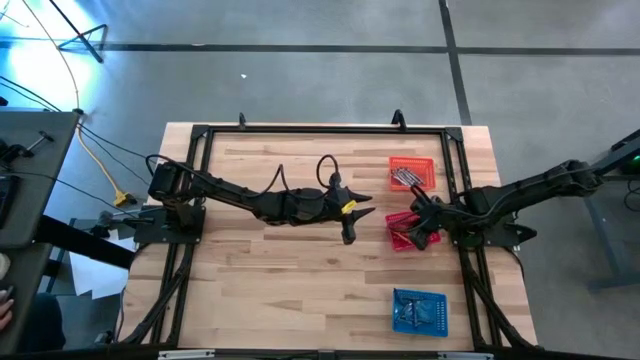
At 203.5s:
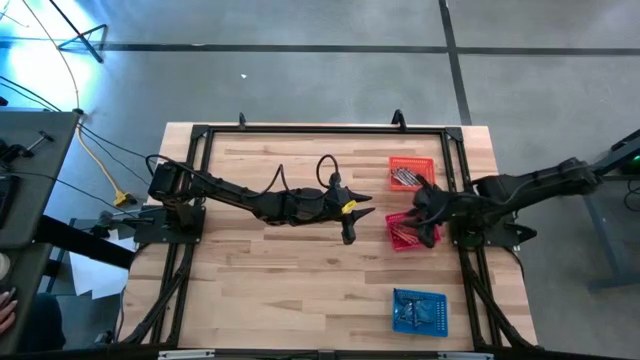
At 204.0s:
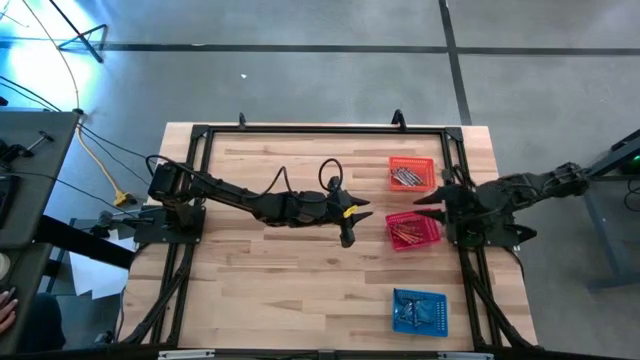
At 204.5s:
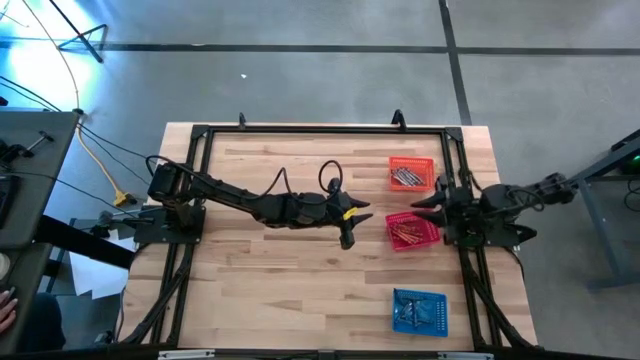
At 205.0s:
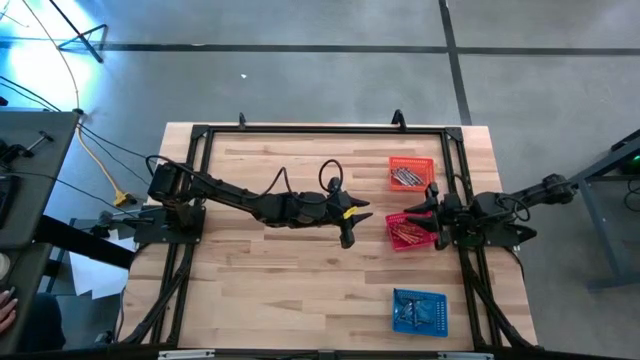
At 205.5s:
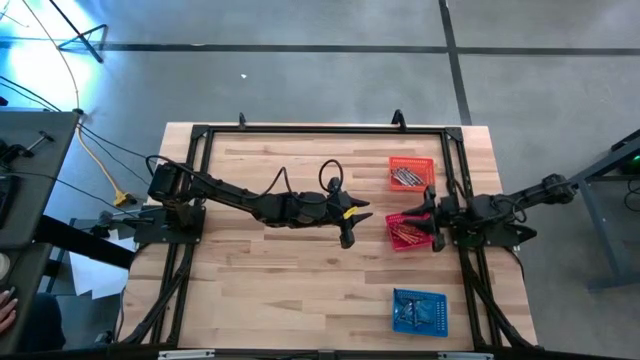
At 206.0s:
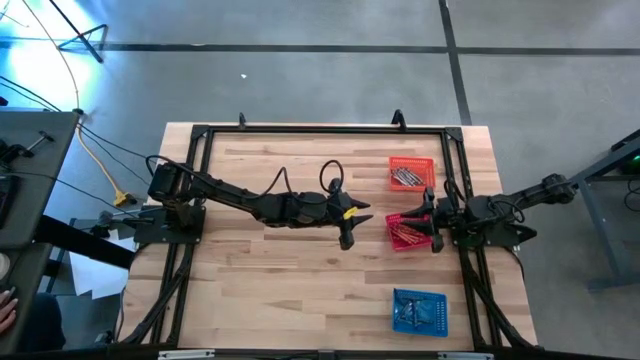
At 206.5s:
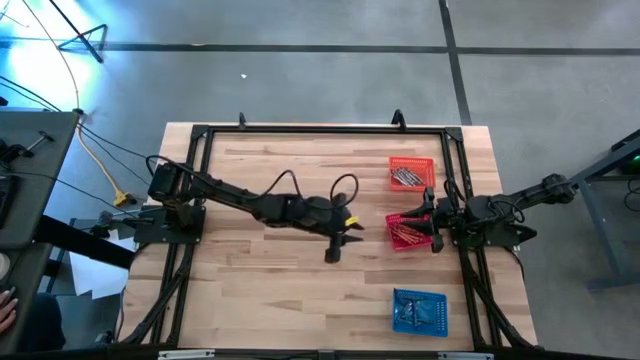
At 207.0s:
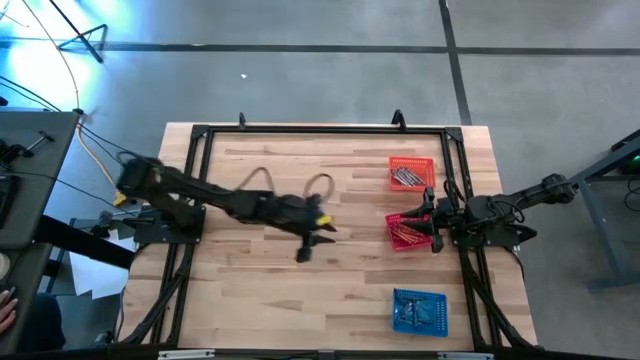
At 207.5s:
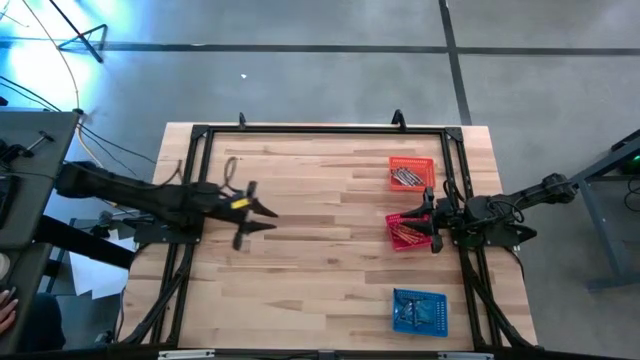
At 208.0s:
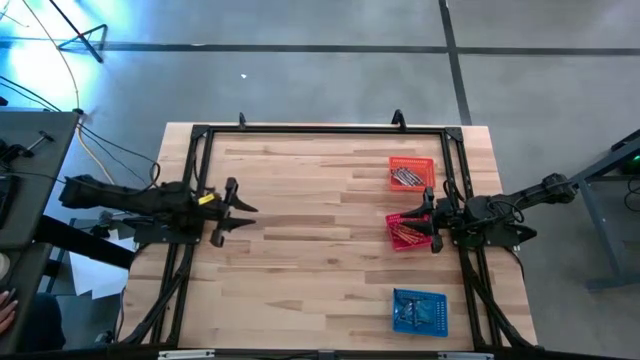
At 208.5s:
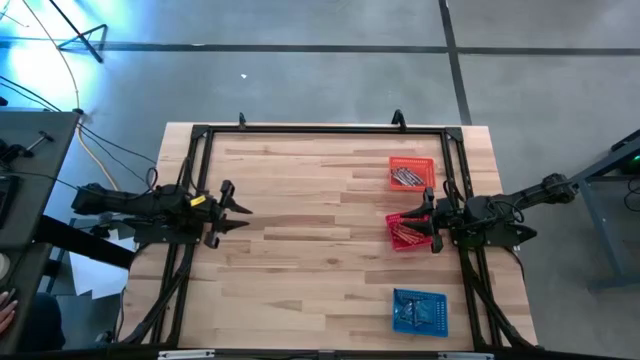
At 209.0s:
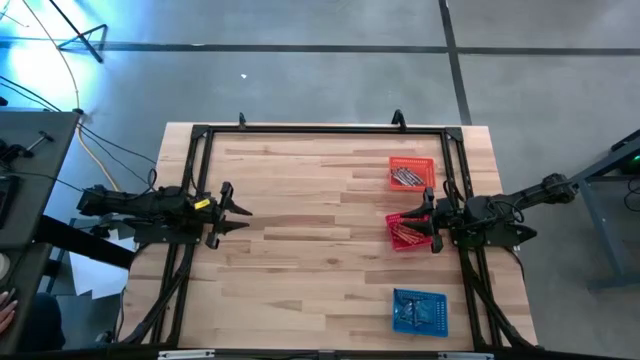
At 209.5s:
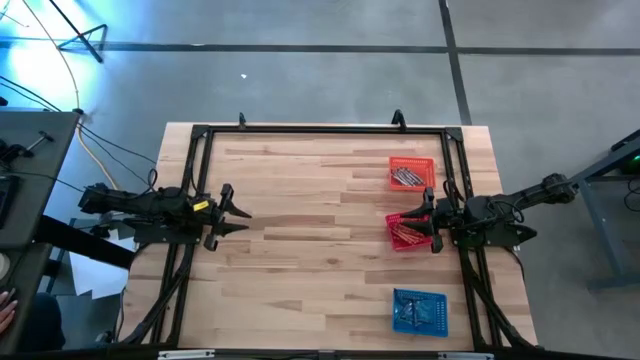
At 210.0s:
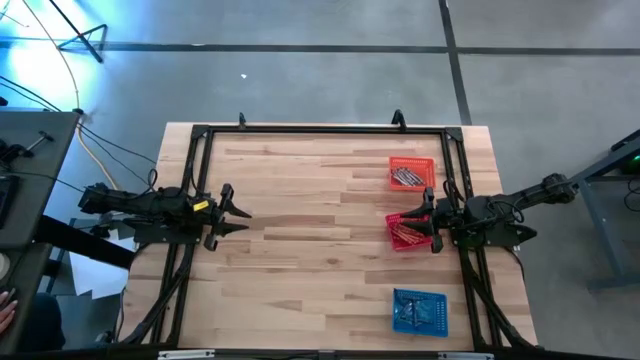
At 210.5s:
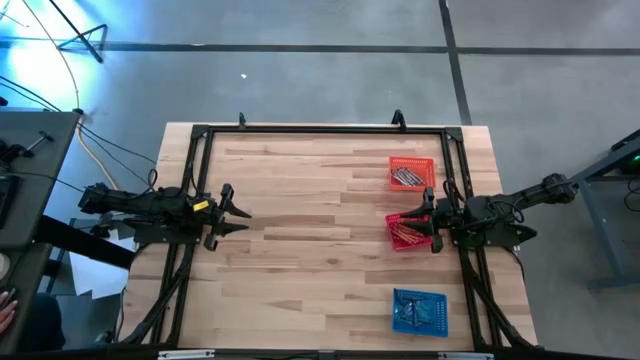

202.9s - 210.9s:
Task: Sort crayons
Return to Home Position

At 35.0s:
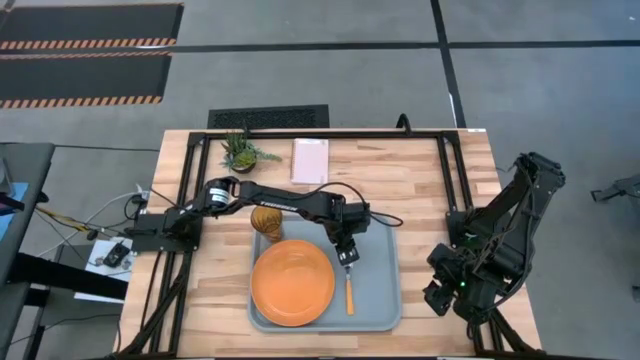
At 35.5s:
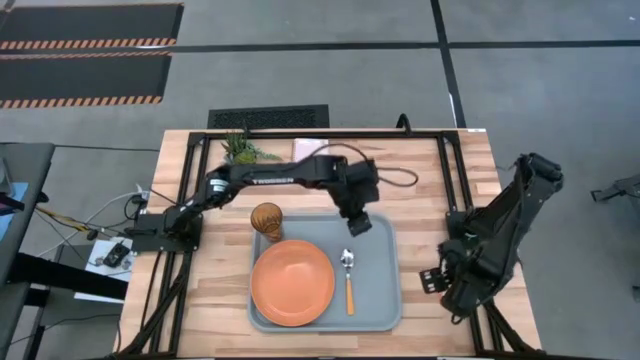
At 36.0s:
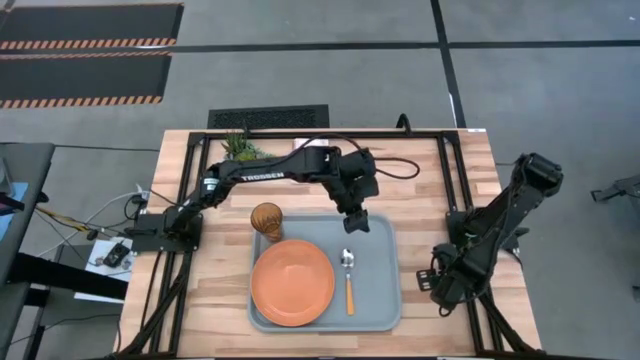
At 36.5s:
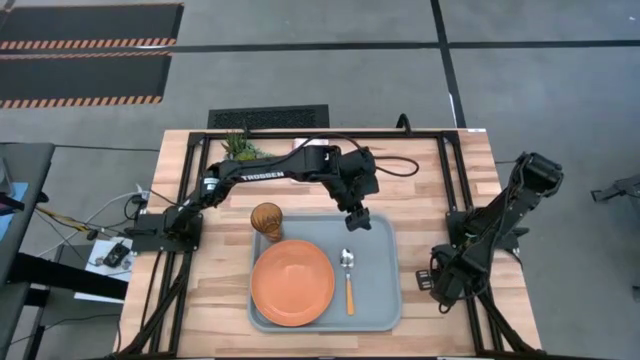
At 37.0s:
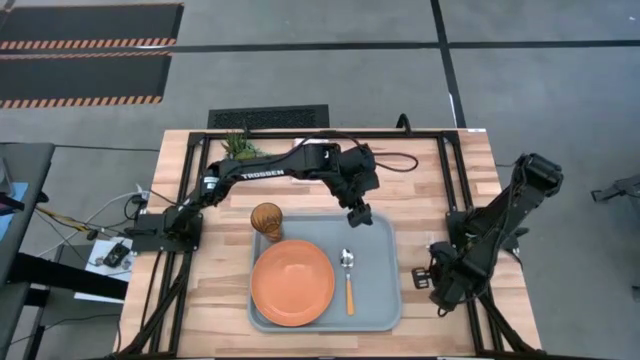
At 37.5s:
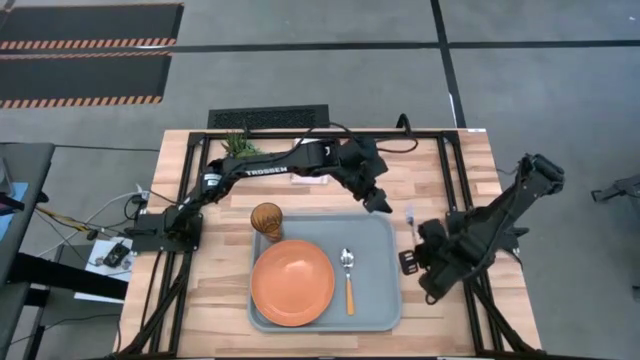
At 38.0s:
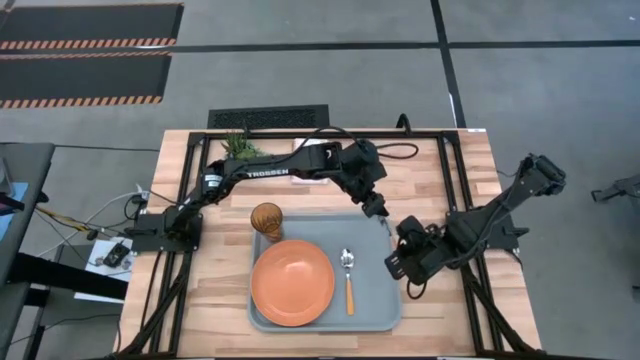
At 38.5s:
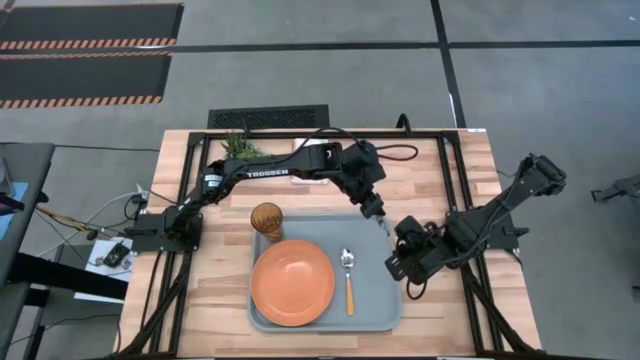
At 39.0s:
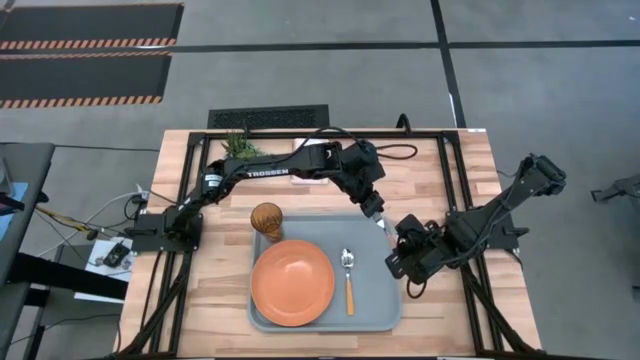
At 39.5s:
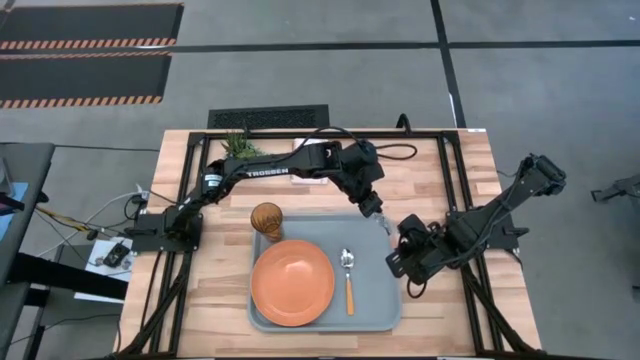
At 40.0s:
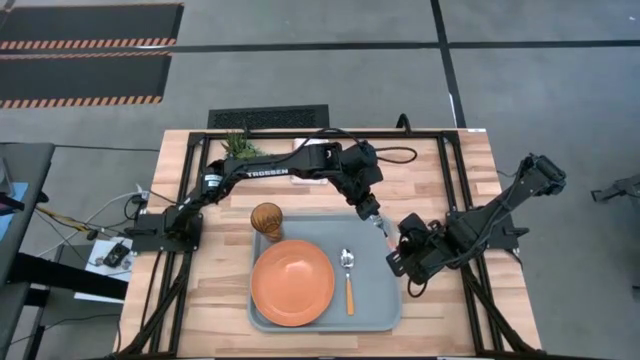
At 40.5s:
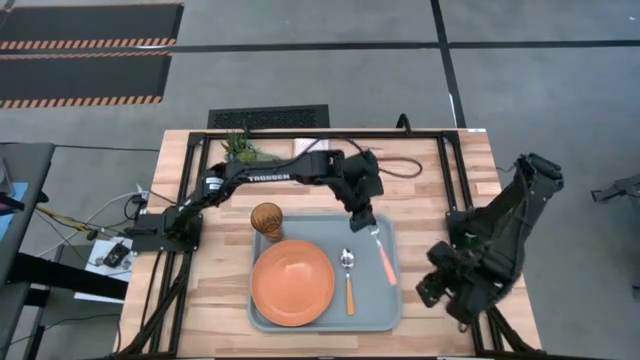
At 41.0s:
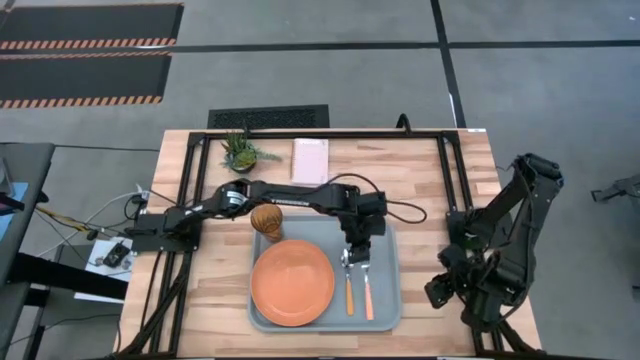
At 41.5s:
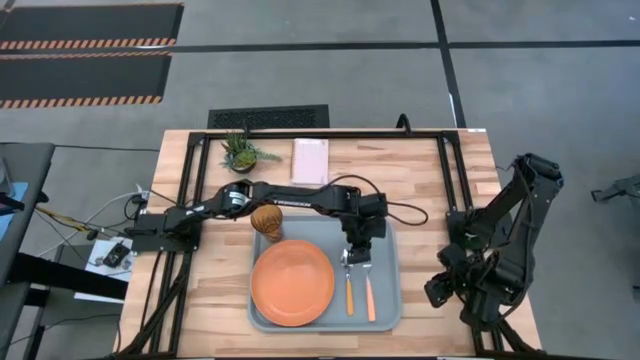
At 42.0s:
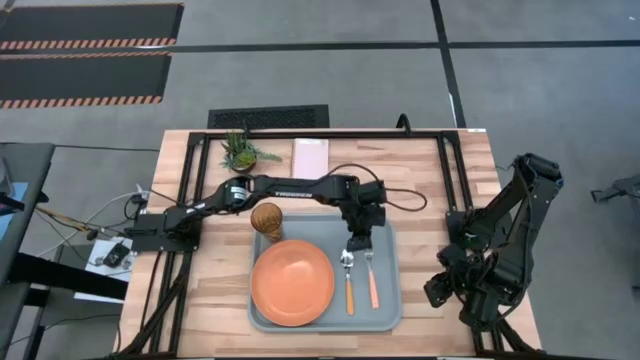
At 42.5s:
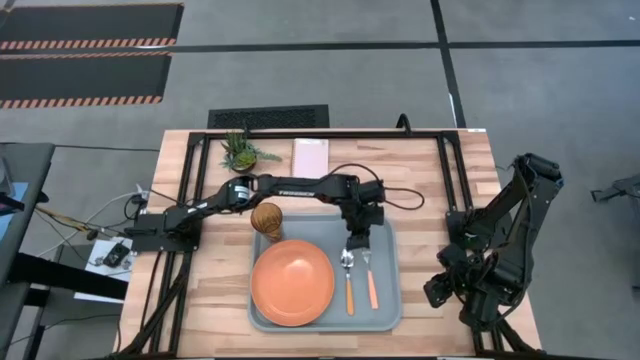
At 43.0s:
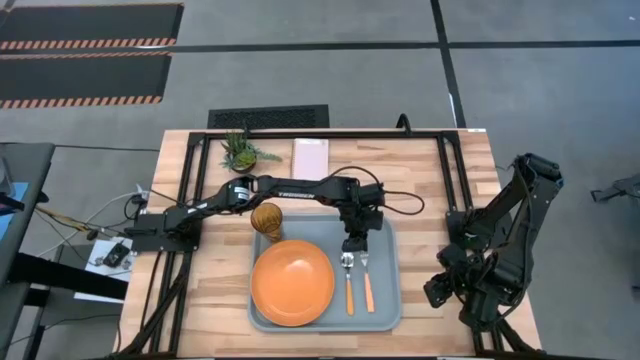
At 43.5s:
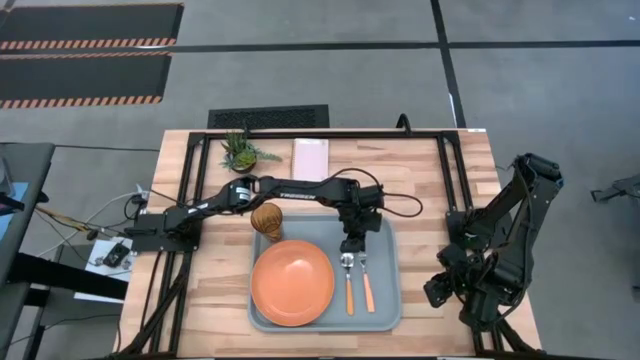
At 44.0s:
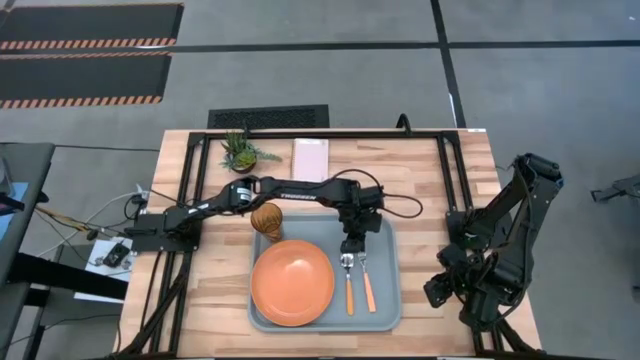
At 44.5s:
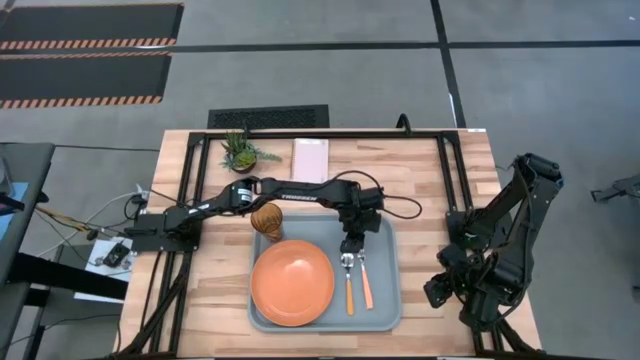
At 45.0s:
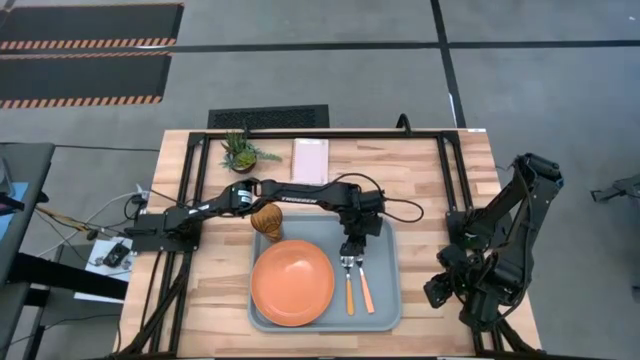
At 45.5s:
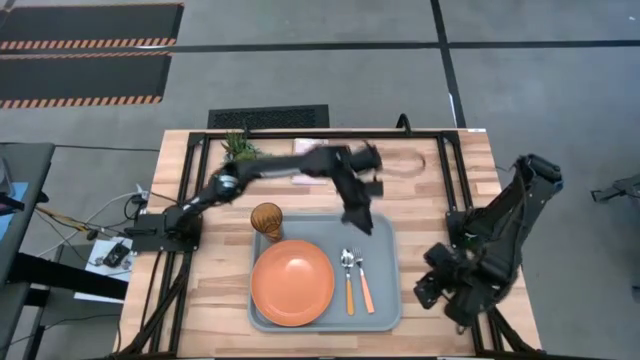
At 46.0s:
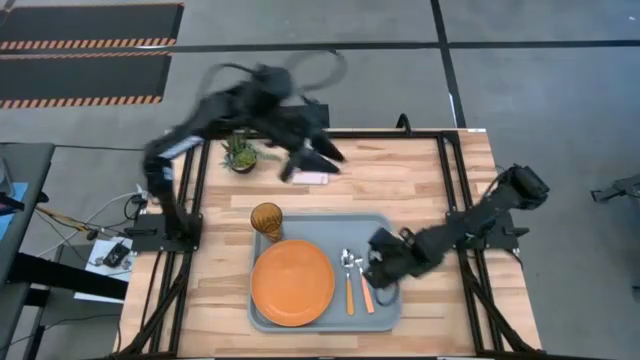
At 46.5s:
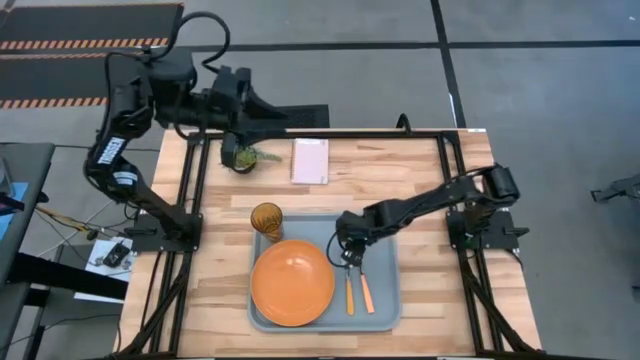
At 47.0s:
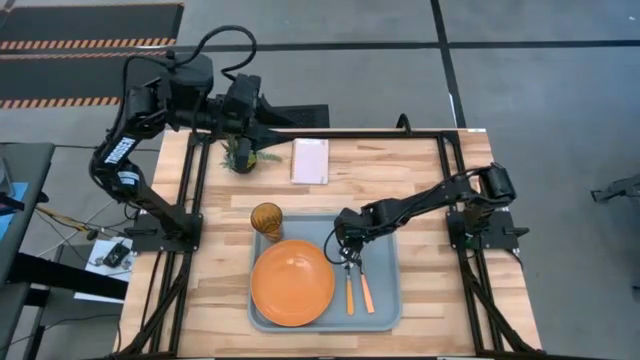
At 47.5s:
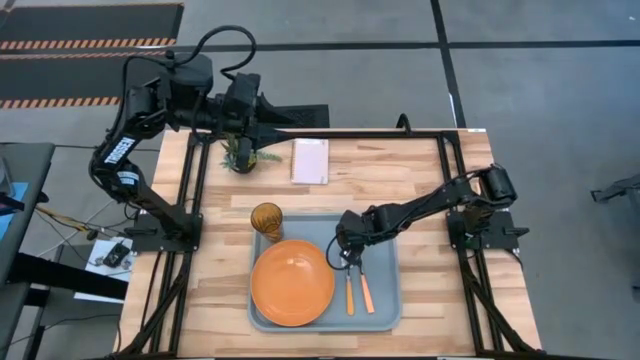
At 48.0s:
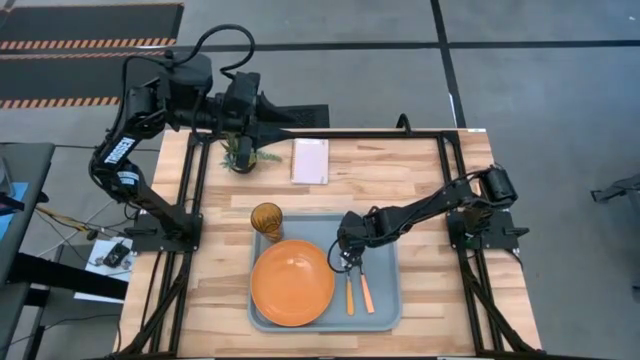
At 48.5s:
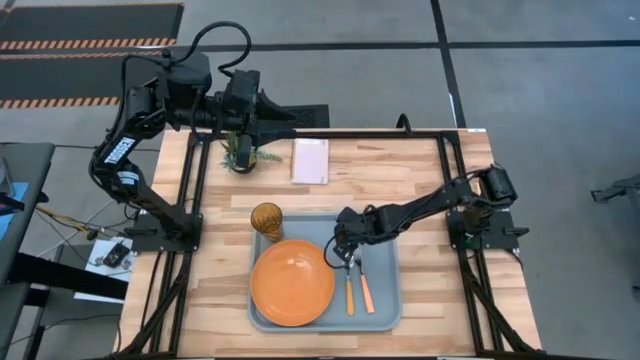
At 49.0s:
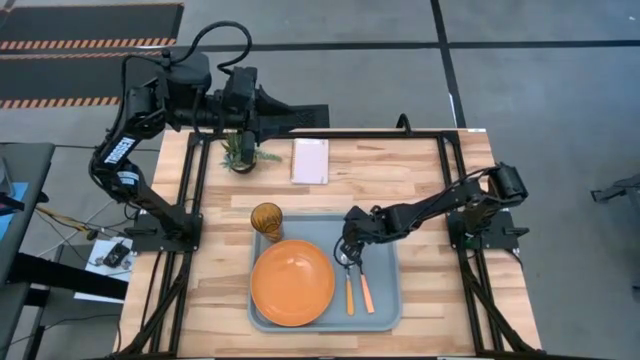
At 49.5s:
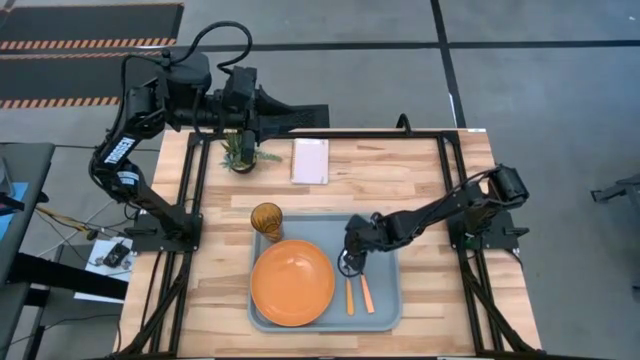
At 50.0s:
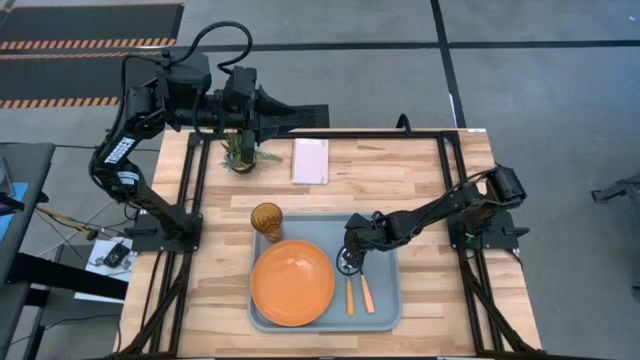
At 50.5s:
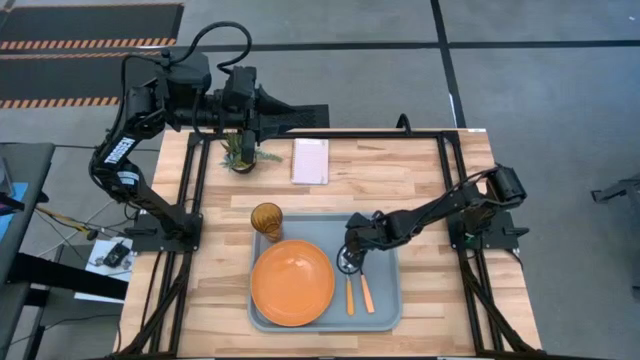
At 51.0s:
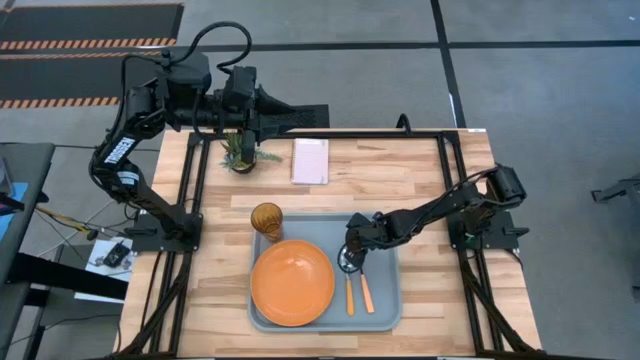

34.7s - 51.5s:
Task: Pick and place plate/cup/fork/spoon on tray
Put the orange fork on the gray tray to the right of the orange spoon
